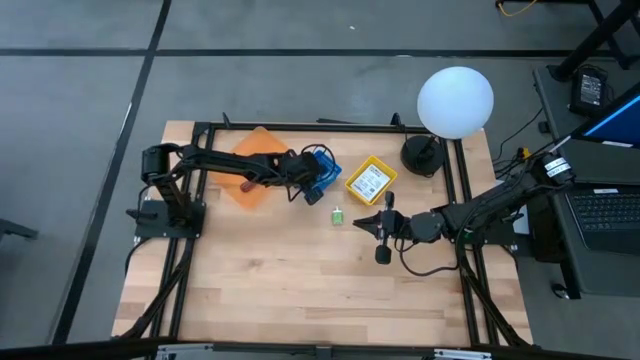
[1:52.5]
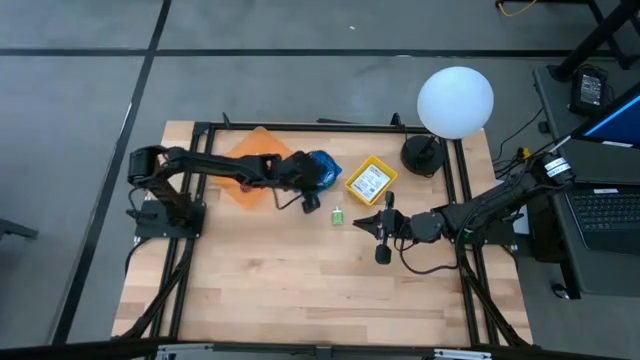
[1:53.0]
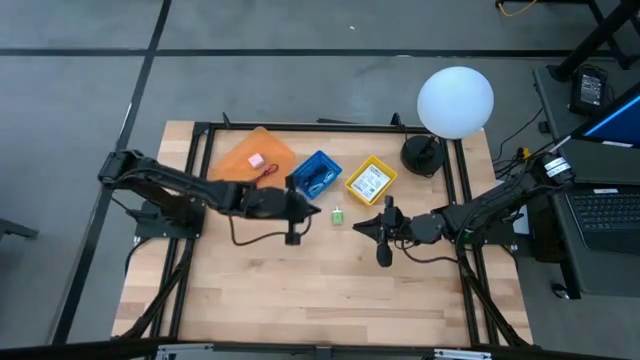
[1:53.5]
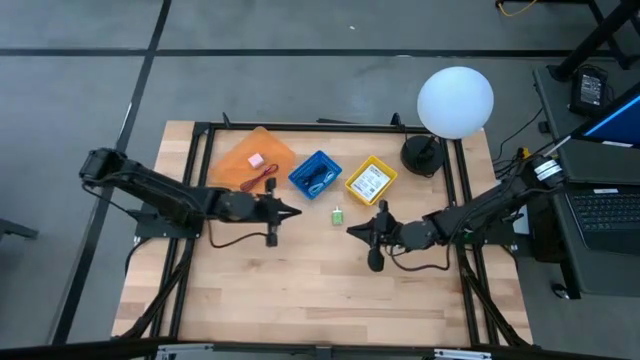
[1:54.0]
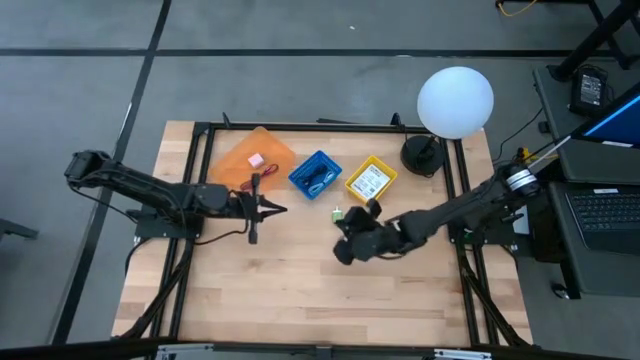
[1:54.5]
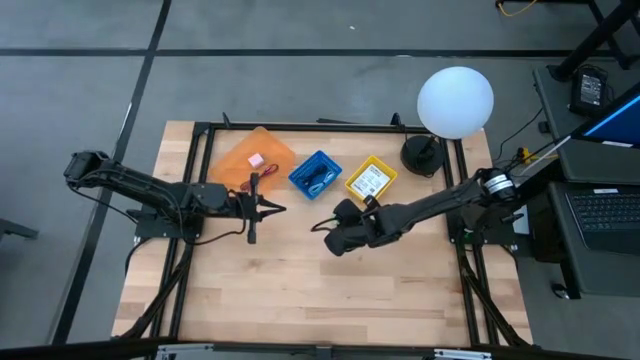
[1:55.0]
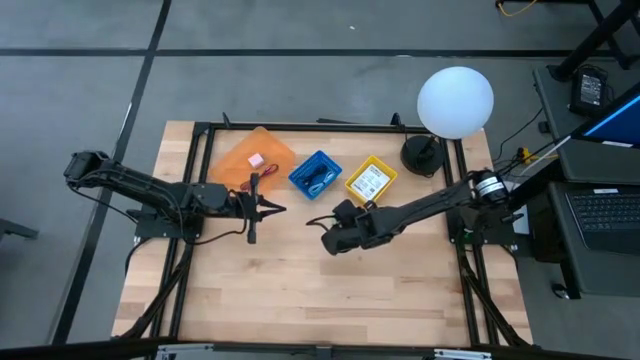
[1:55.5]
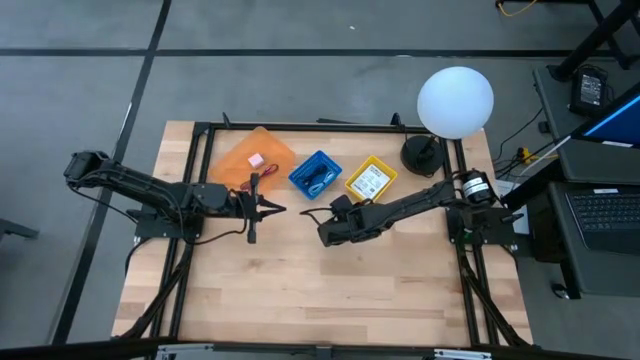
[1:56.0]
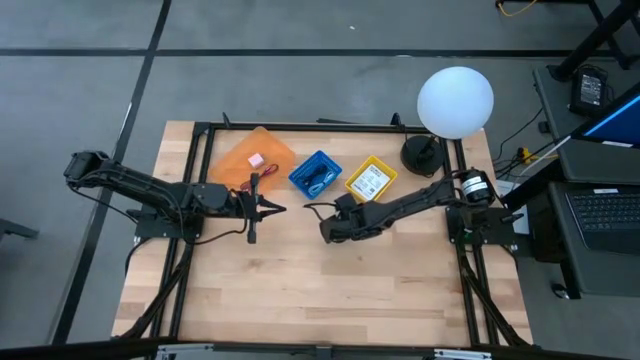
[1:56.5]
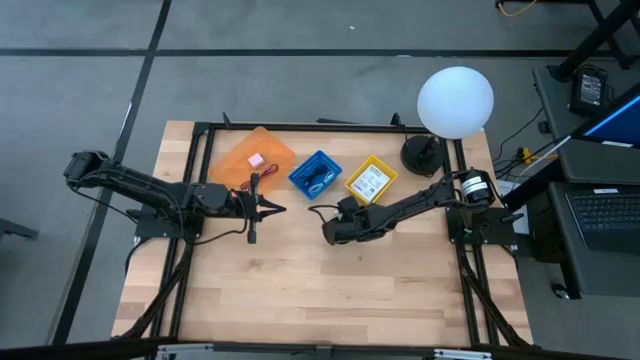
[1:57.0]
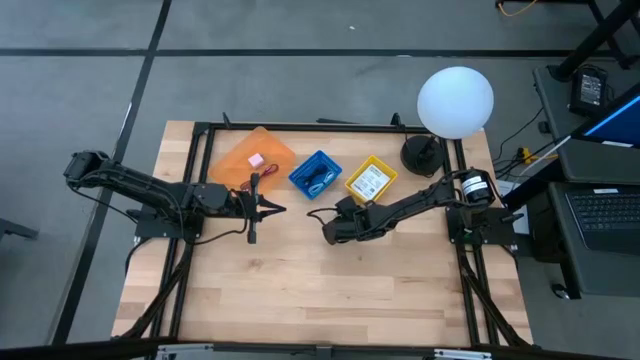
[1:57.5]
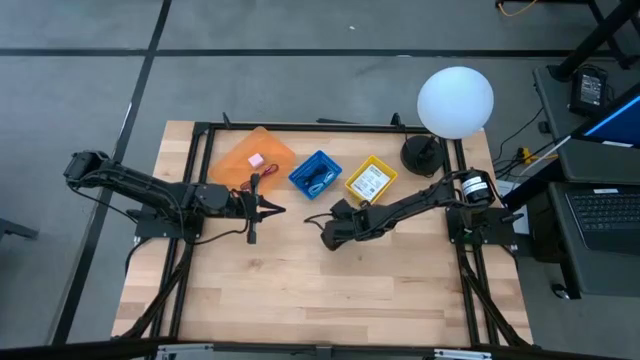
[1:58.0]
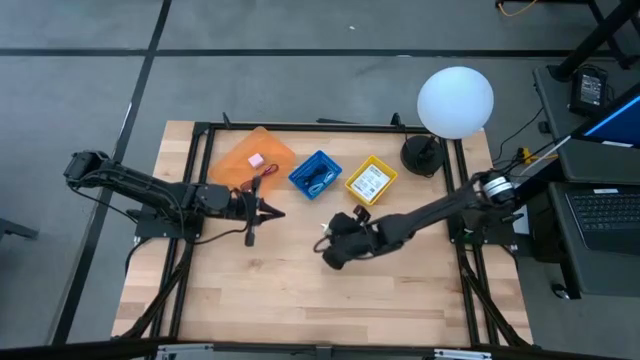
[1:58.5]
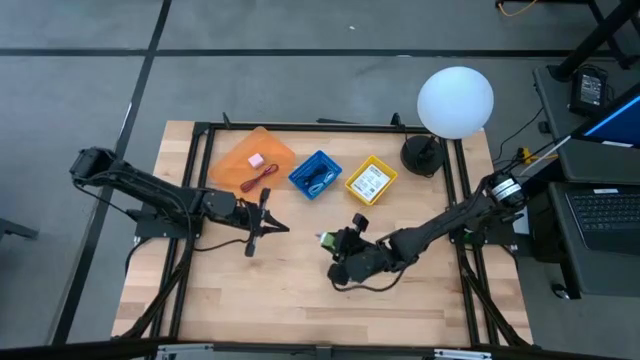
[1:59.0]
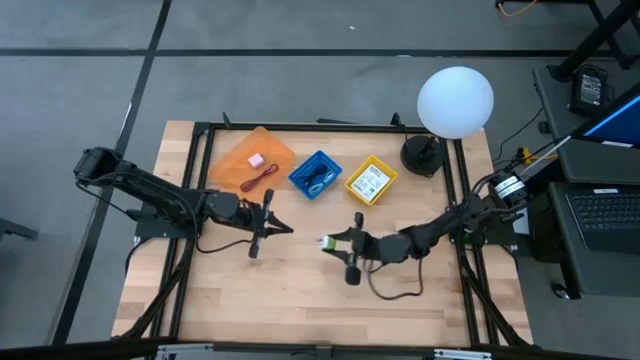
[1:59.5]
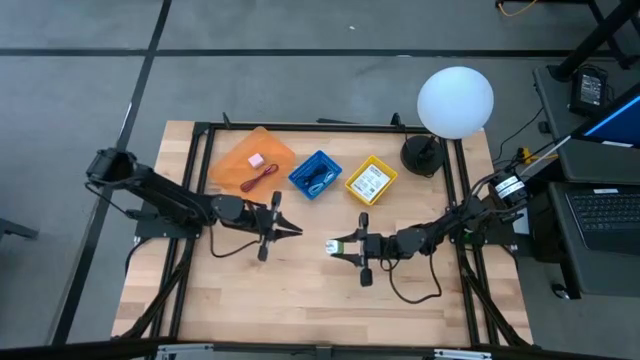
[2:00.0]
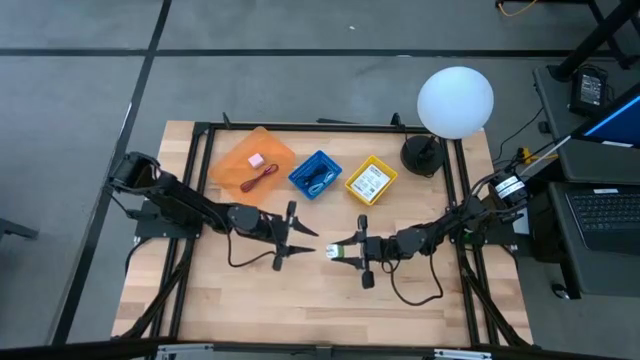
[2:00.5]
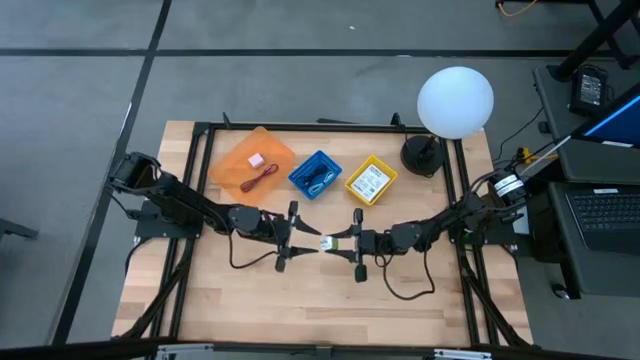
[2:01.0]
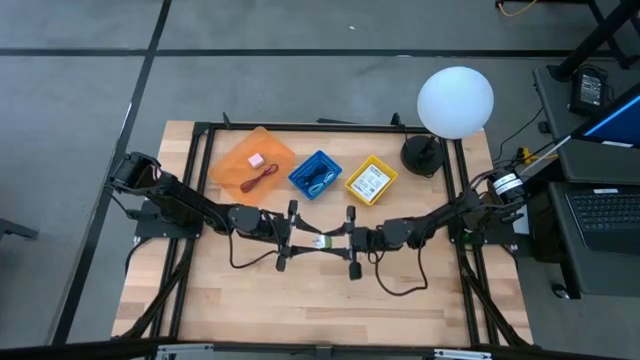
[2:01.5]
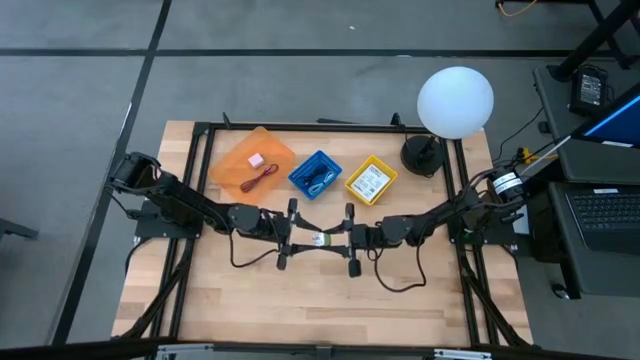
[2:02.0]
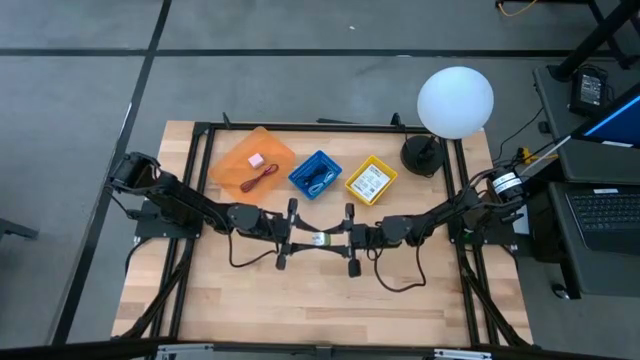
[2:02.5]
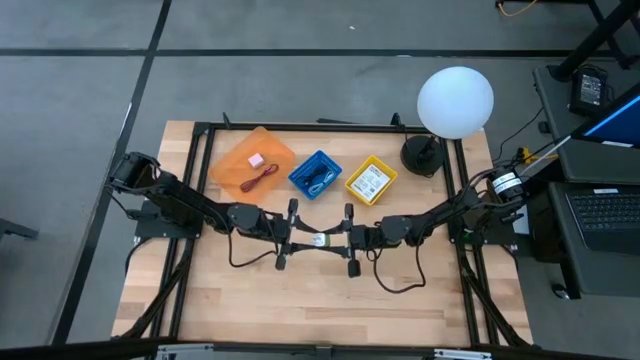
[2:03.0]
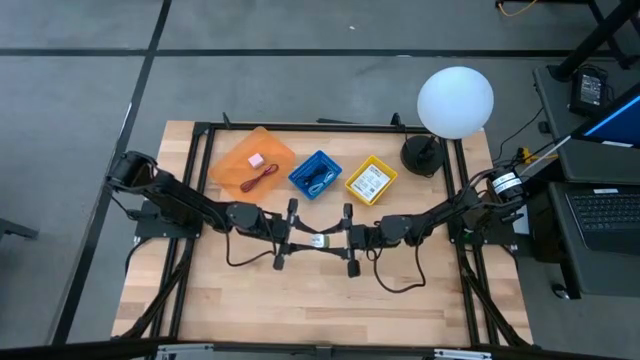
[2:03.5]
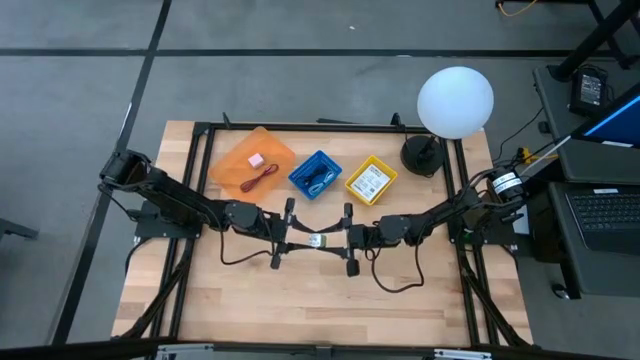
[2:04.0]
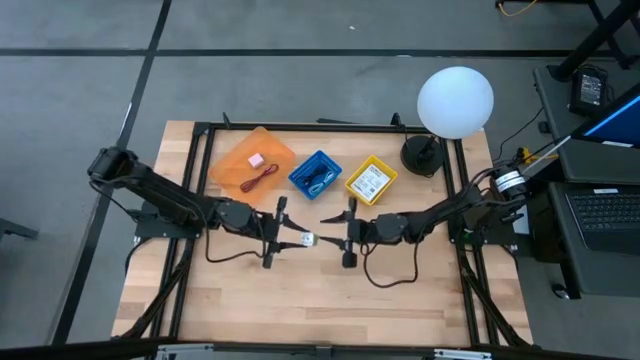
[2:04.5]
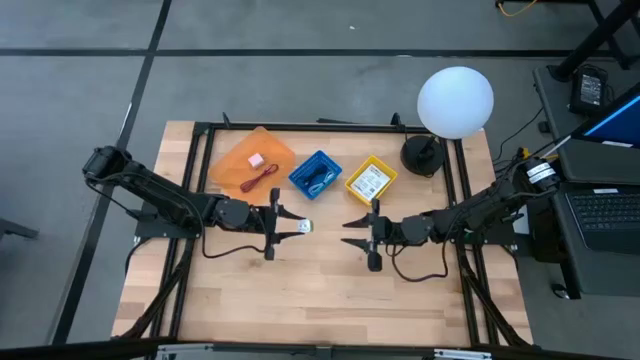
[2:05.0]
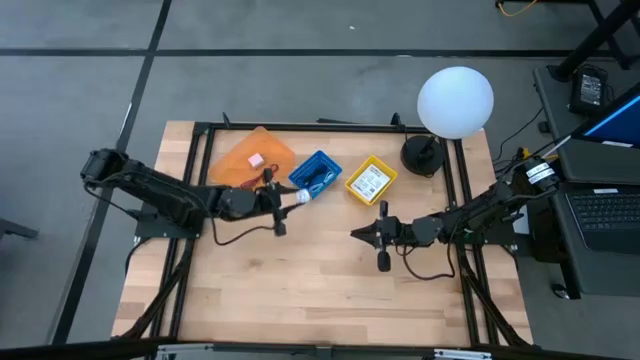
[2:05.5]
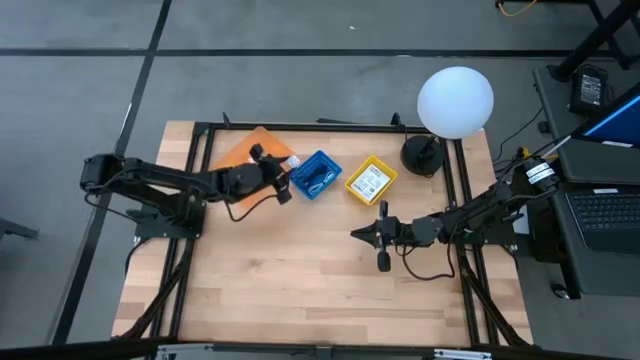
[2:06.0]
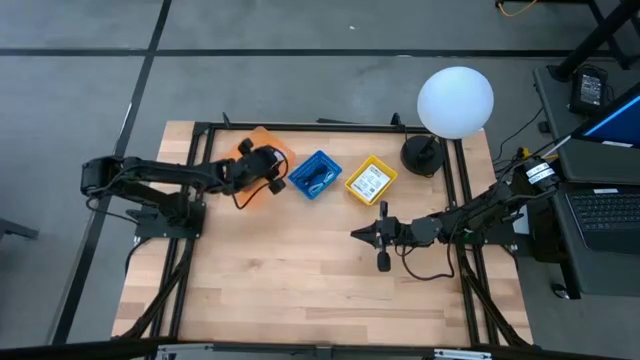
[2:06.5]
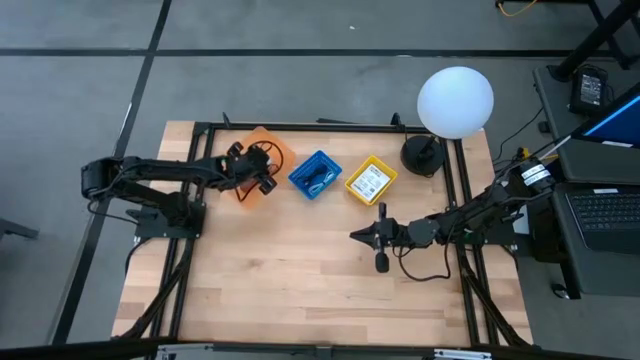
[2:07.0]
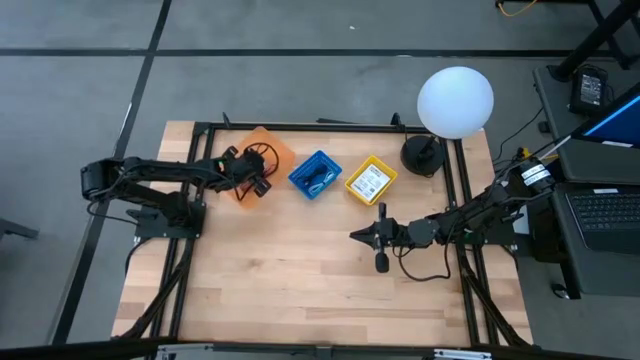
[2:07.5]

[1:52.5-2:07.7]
Task: Pick and place items into bin
Put the green charger adapter into the orange bin

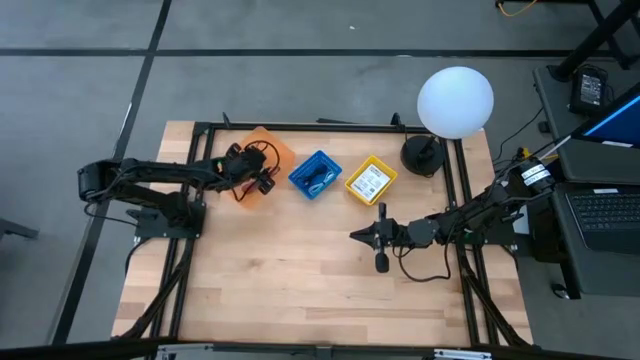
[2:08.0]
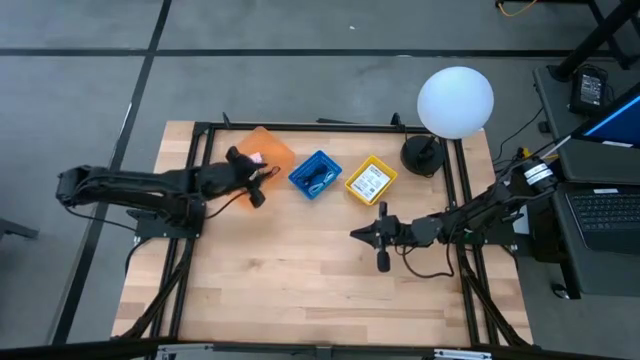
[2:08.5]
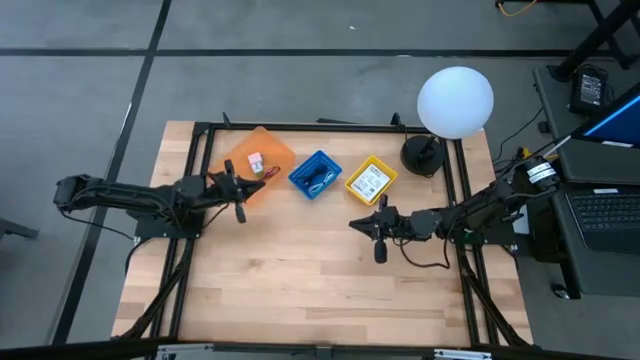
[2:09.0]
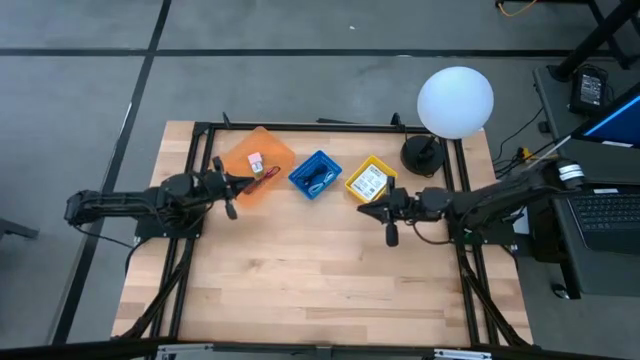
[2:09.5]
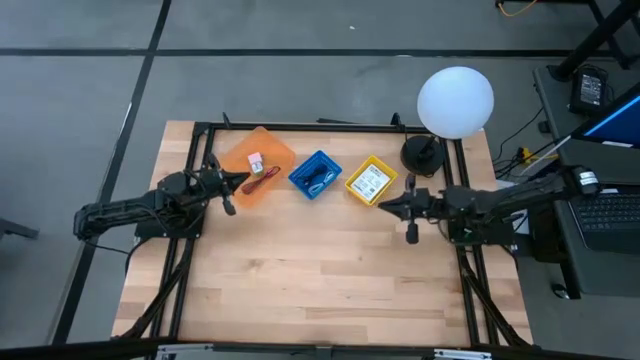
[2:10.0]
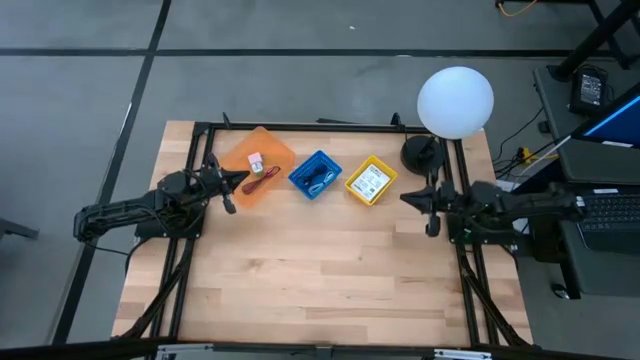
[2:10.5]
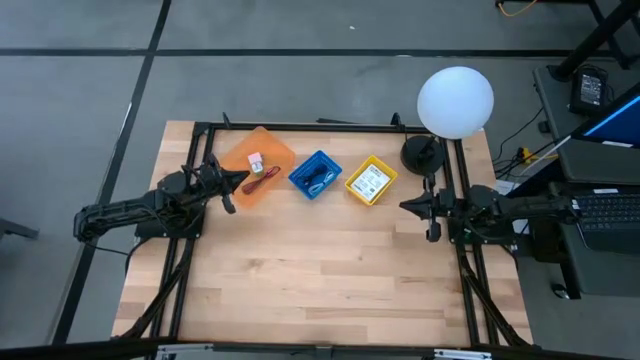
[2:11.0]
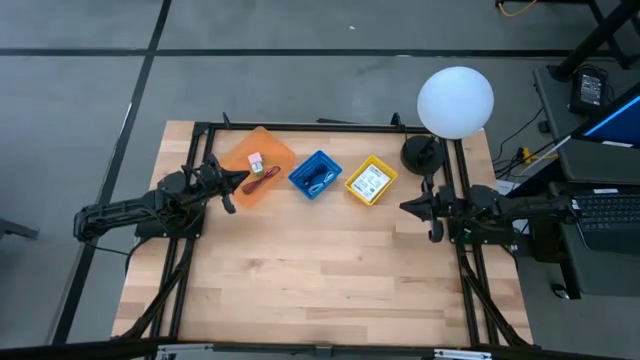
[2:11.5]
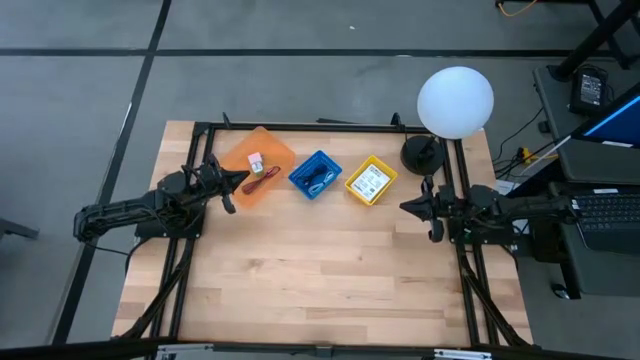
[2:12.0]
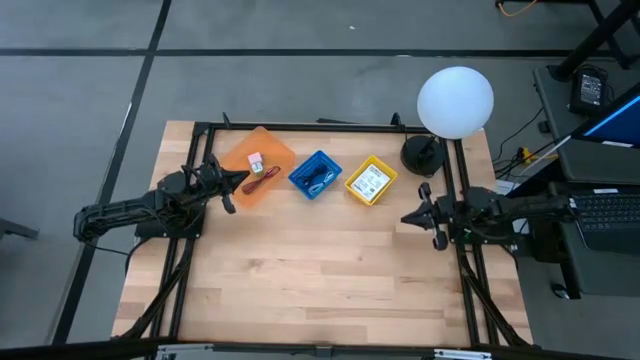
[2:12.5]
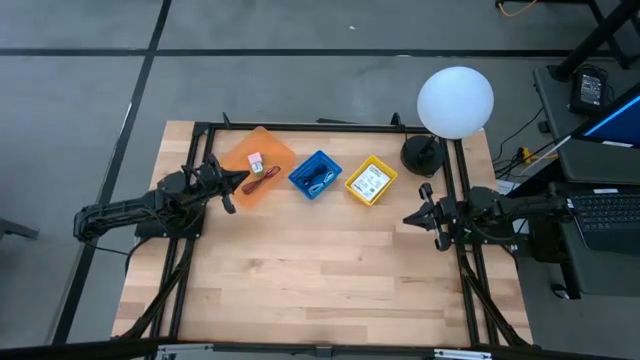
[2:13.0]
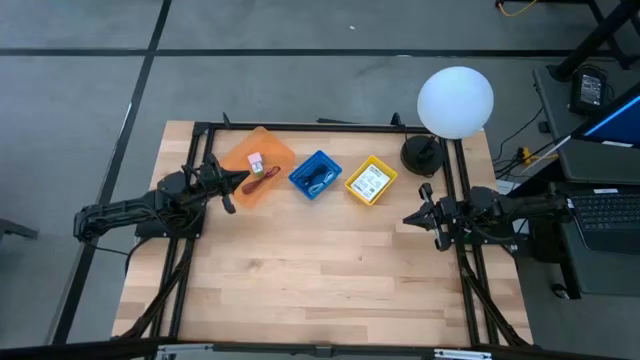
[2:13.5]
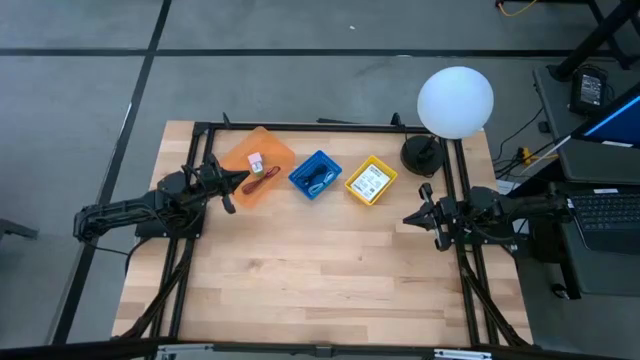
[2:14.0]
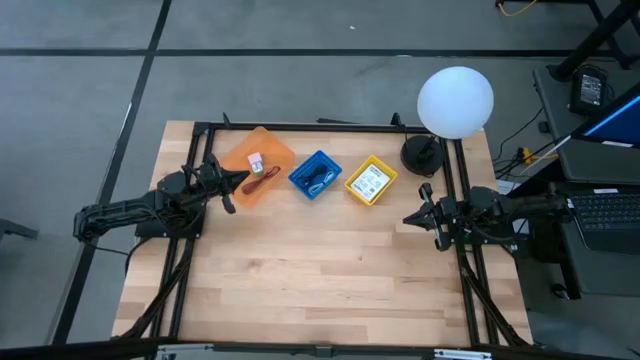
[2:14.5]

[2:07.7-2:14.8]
Return to Home Position
